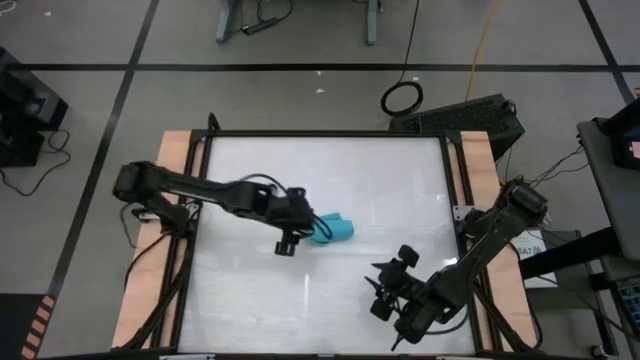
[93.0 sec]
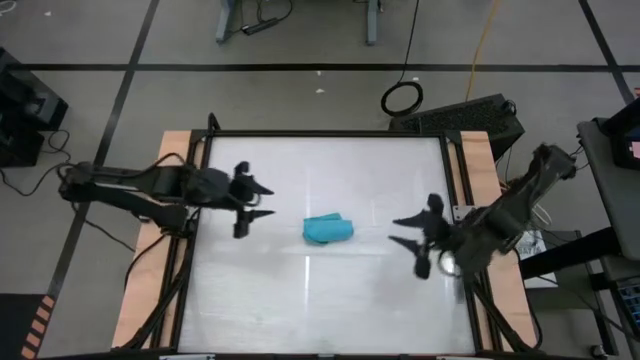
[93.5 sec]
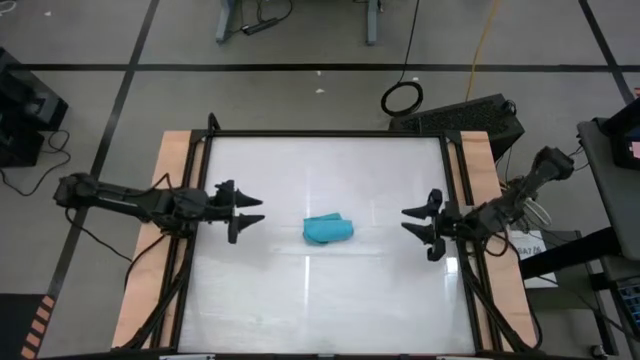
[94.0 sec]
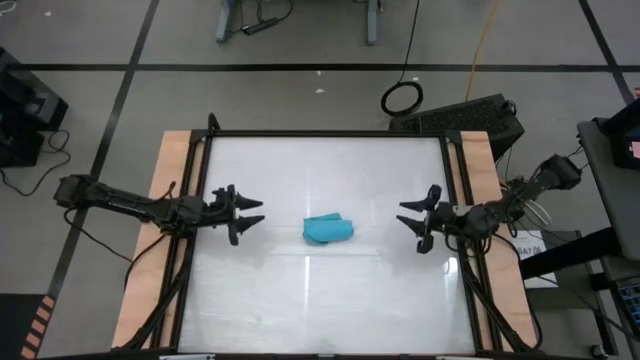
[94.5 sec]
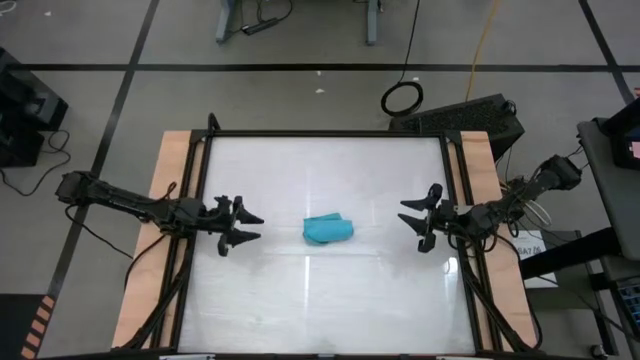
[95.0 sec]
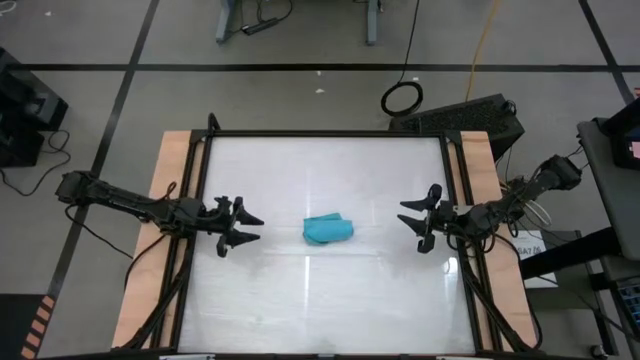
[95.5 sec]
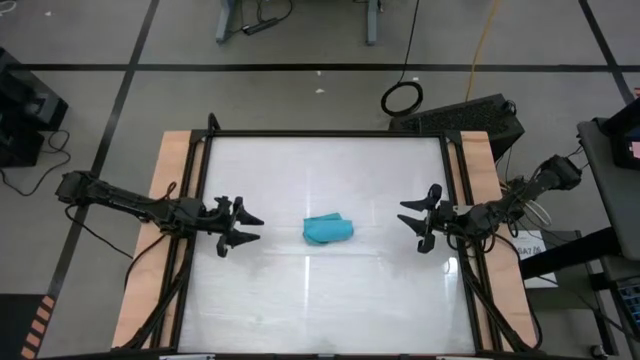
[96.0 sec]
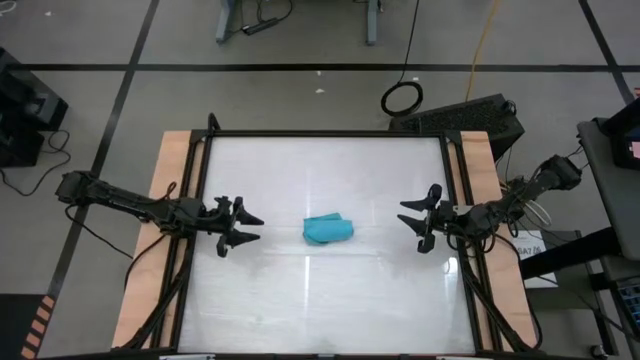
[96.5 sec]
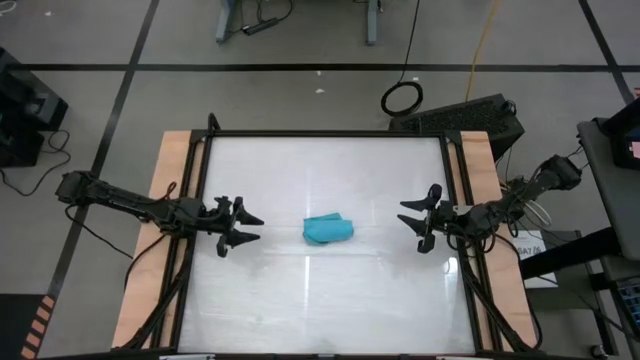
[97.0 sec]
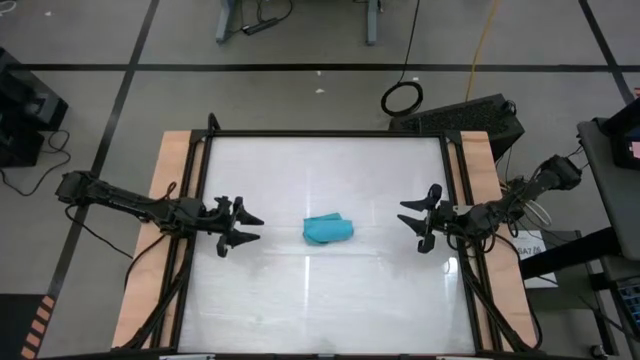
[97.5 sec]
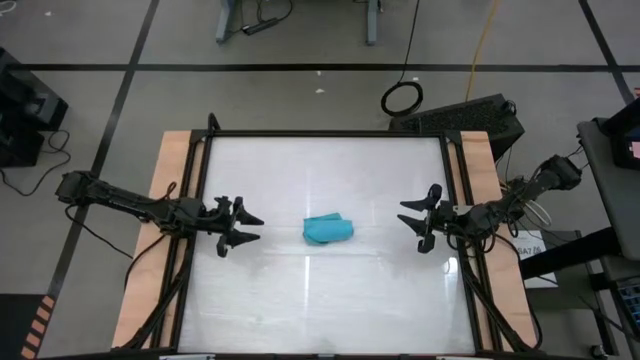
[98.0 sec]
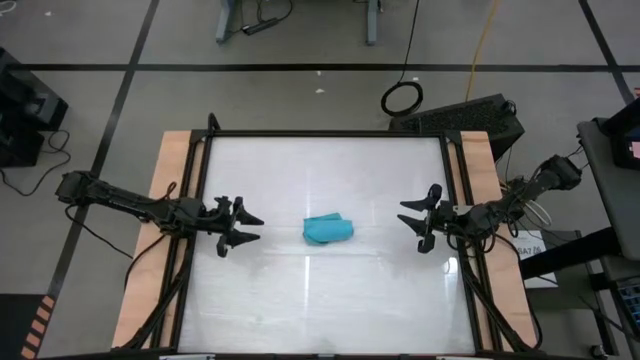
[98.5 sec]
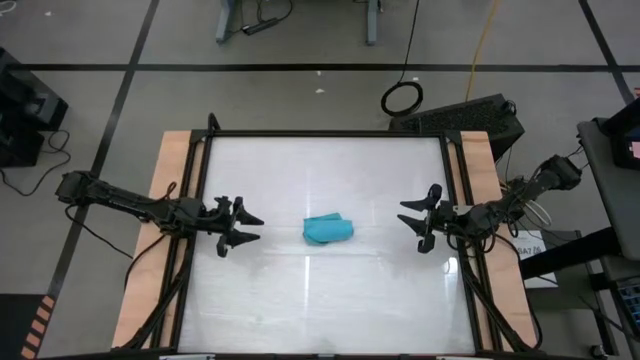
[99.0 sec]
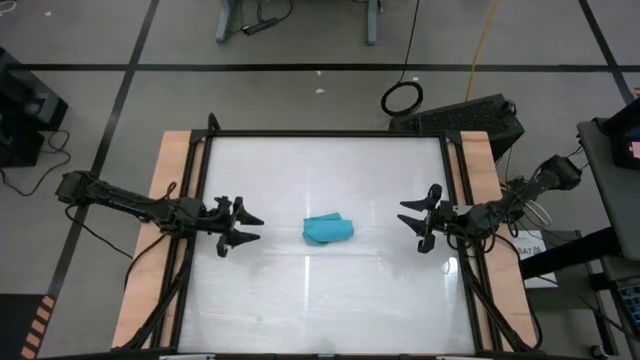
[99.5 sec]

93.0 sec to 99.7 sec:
Task: Roll towel
Return to Home Position

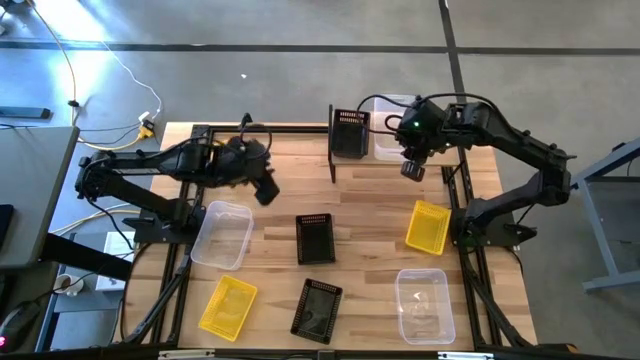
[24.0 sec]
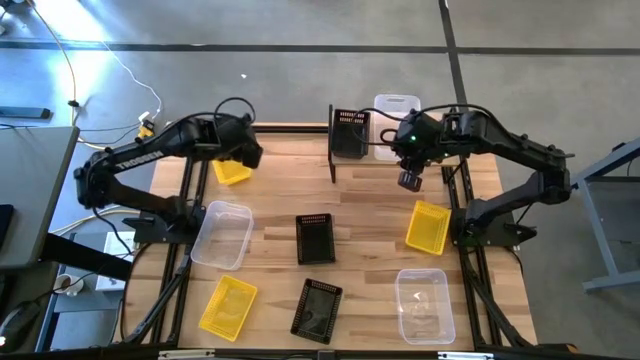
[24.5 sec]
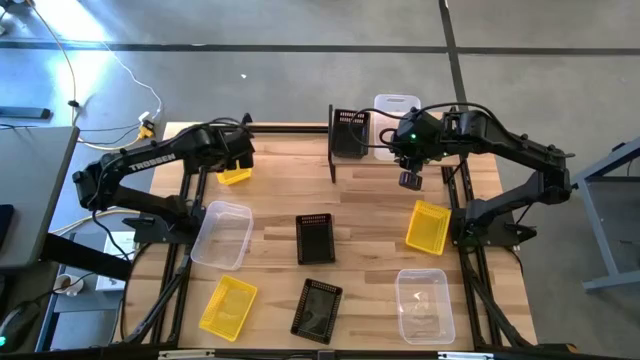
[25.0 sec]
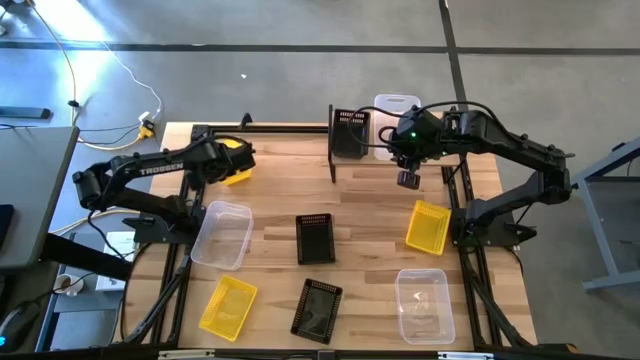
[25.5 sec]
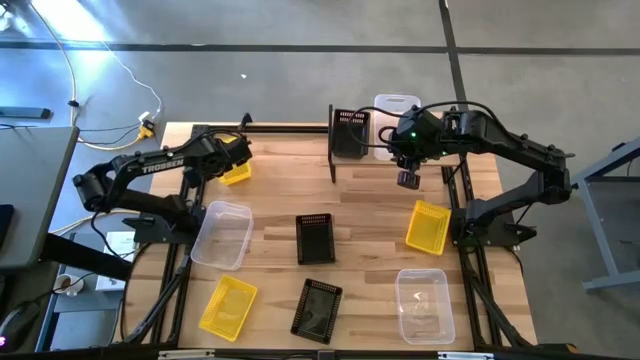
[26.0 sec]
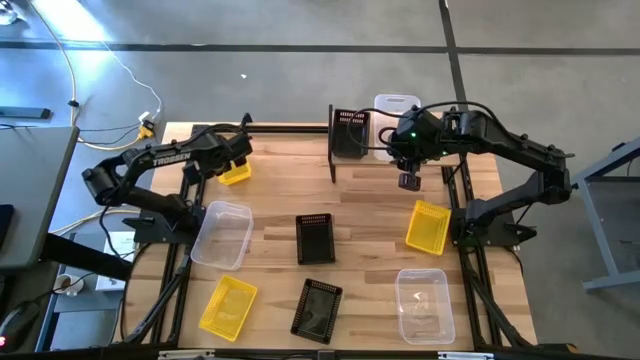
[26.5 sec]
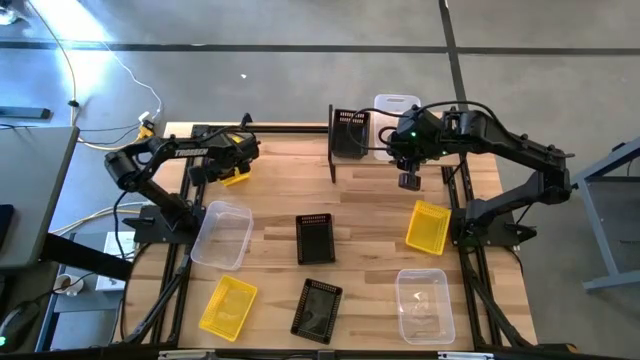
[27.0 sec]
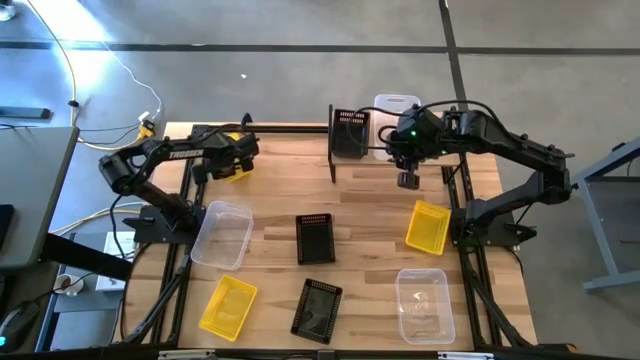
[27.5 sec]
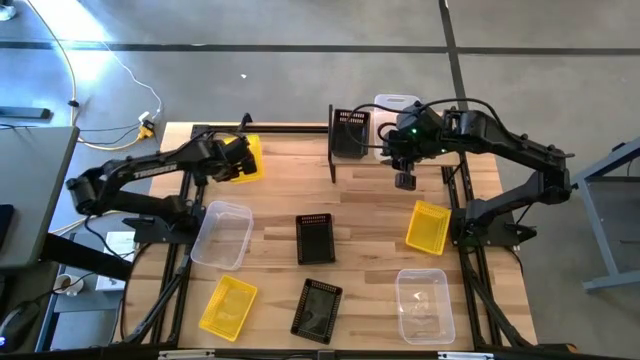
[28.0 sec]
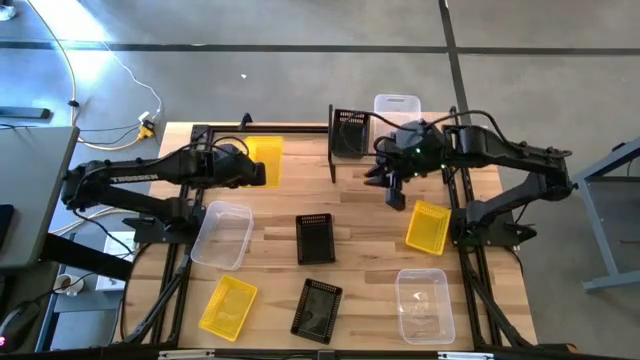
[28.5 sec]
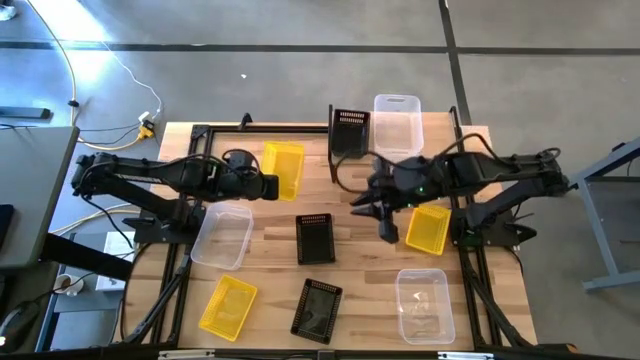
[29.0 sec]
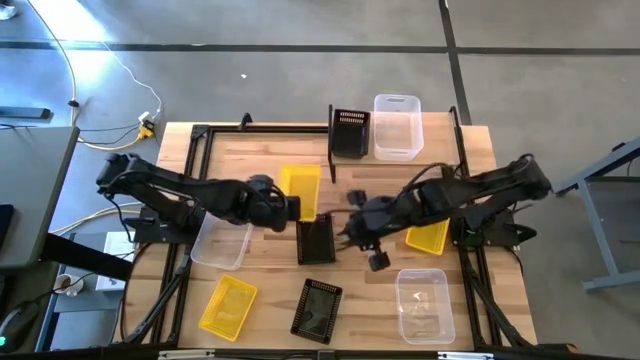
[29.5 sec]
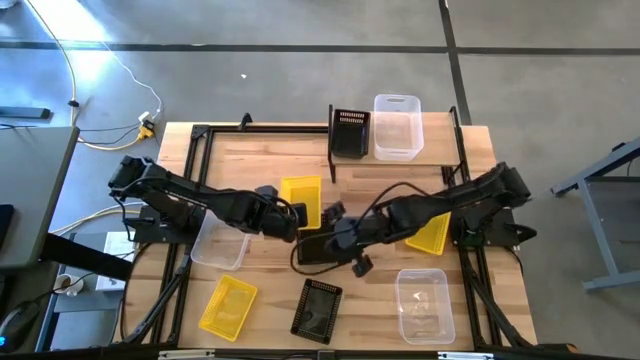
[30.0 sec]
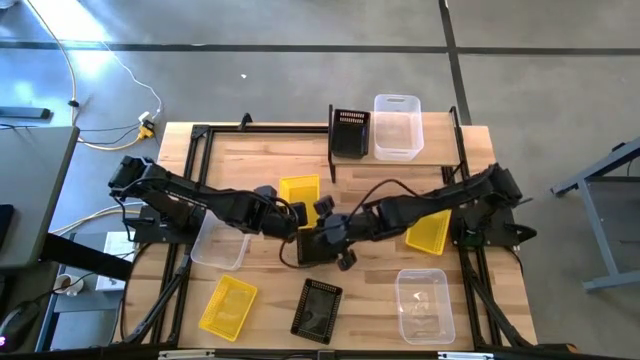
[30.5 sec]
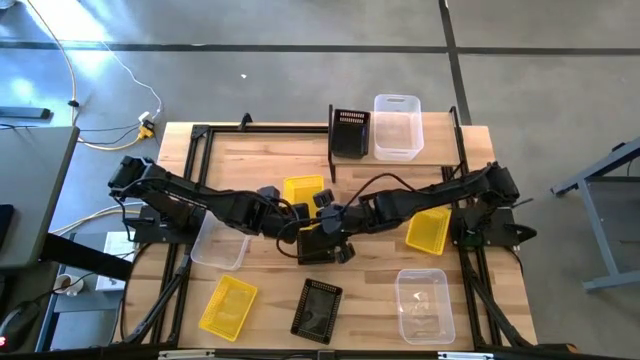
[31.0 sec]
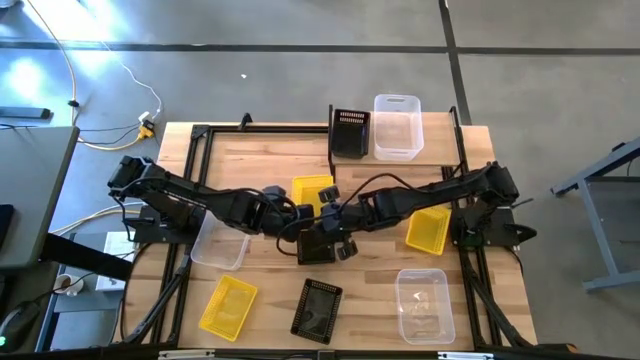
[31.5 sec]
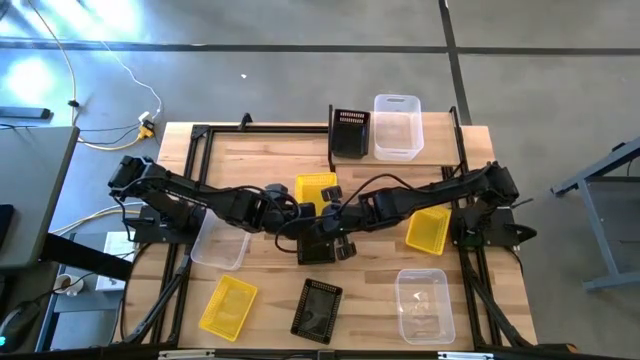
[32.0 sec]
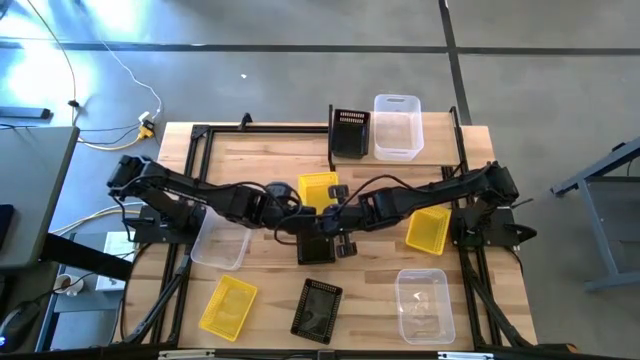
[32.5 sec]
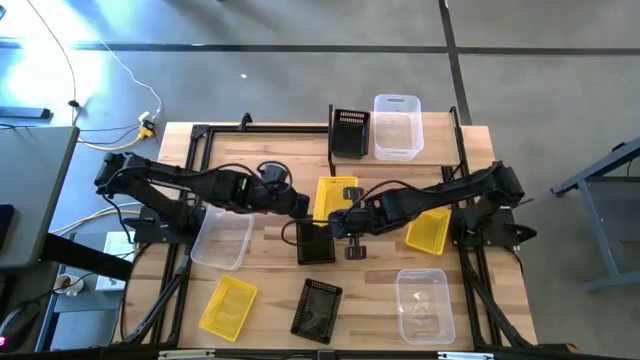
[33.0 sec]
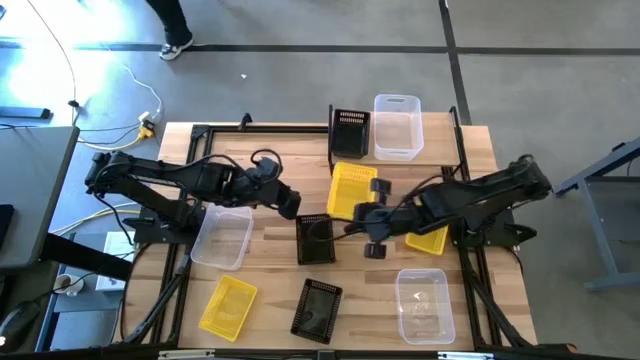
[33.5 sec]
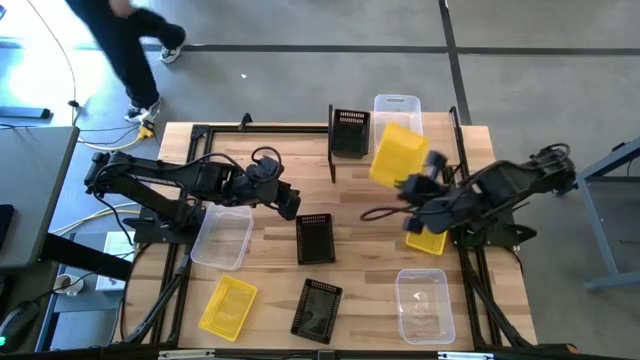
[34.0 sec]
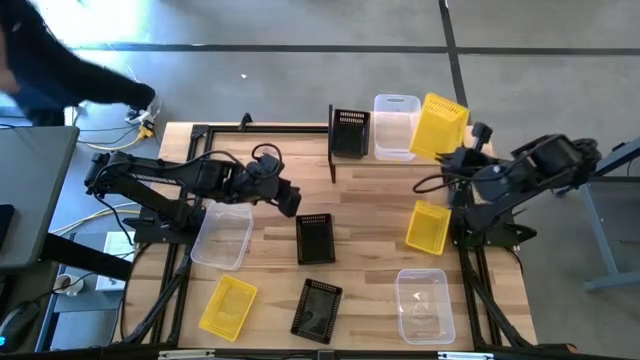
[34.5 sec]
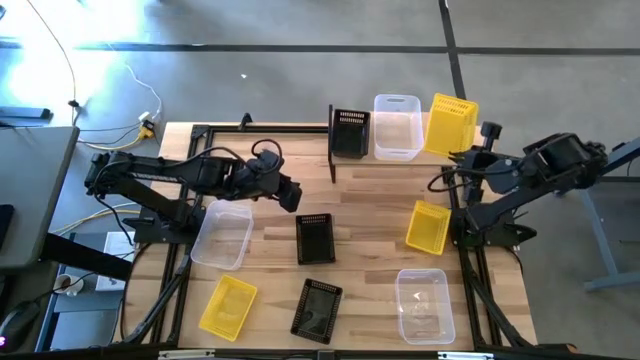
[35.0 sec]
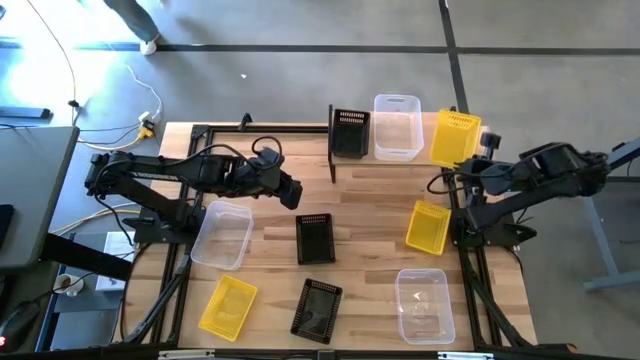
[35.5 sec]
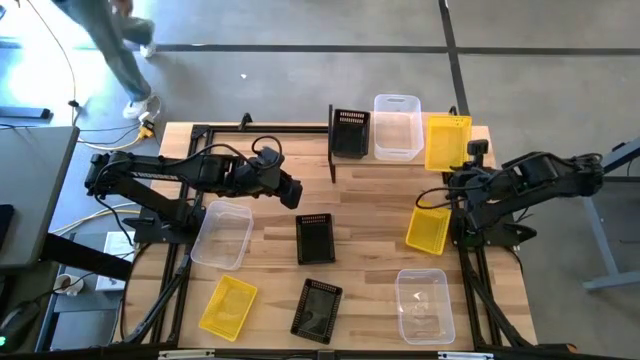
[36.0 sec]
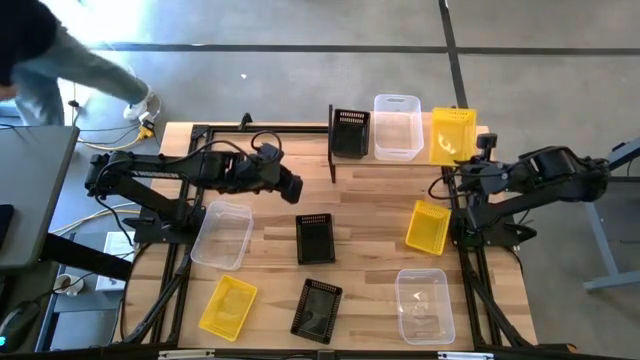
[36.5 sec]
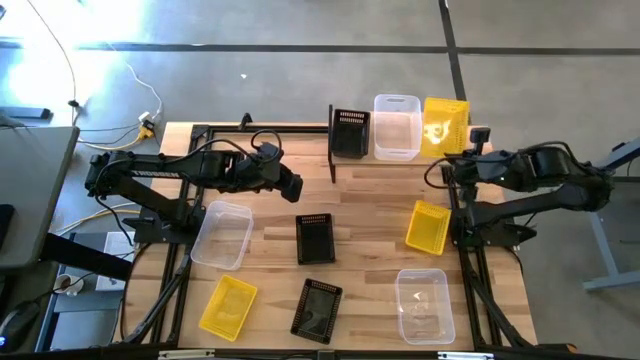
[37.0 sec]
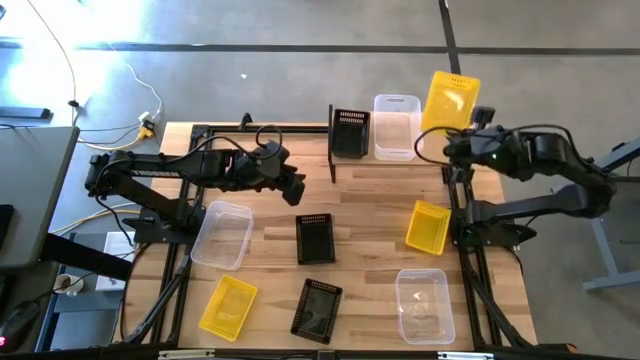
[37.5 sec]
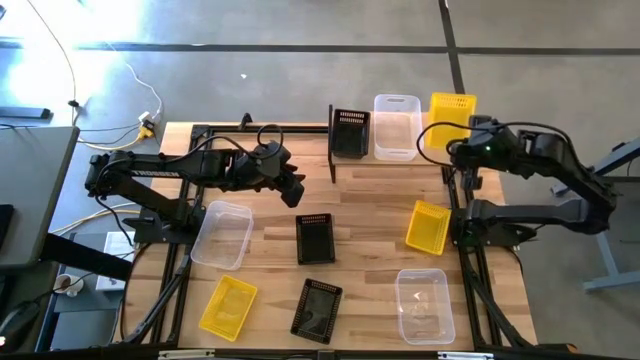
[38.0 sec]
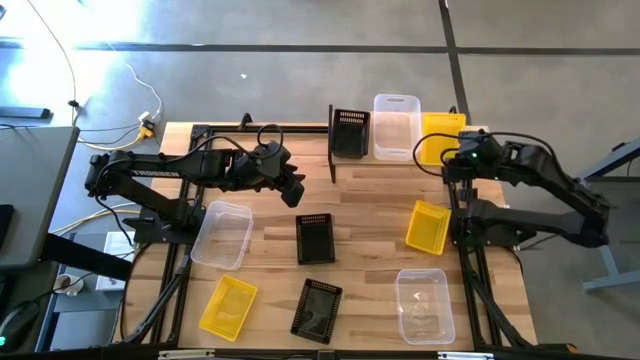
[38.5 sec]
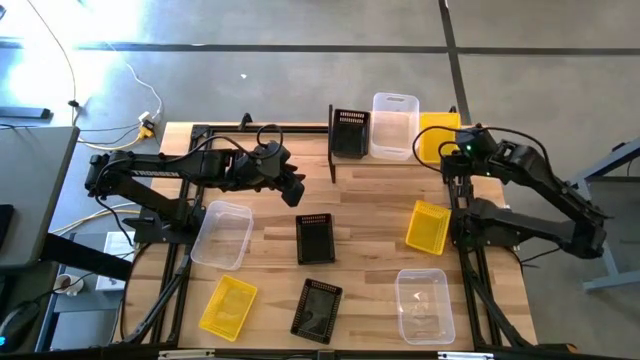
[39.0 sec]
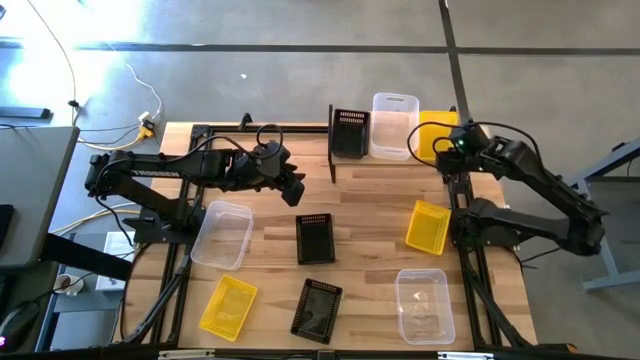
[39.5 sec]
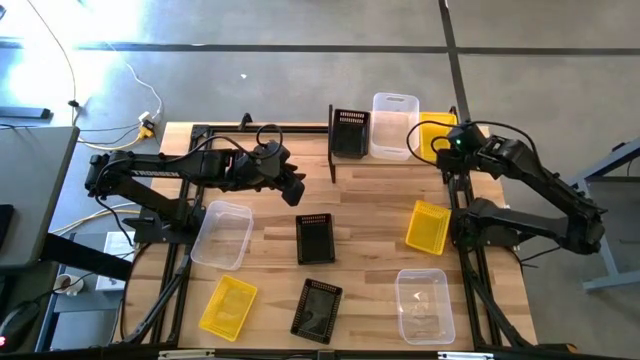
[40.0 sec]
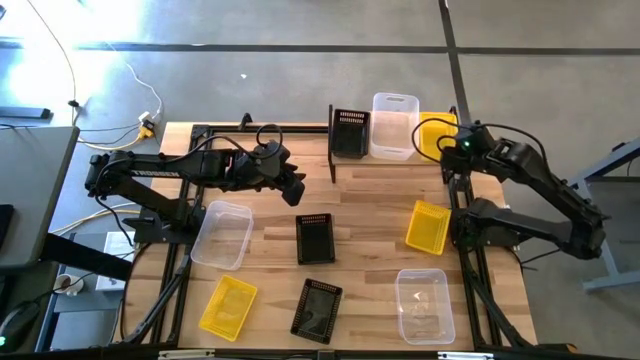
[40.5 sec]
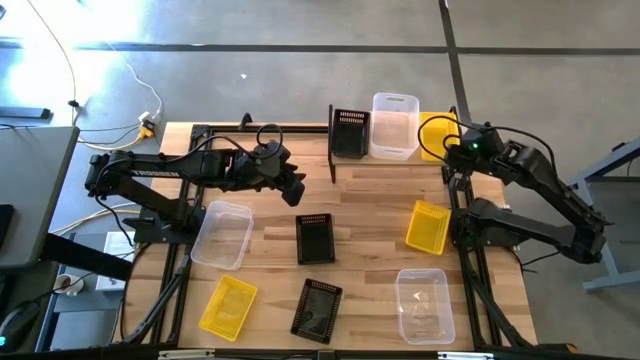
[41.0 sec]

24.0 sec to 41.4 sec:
Task: Stack baskets on shelf by color
Put the top left yellow bin on the shelf
